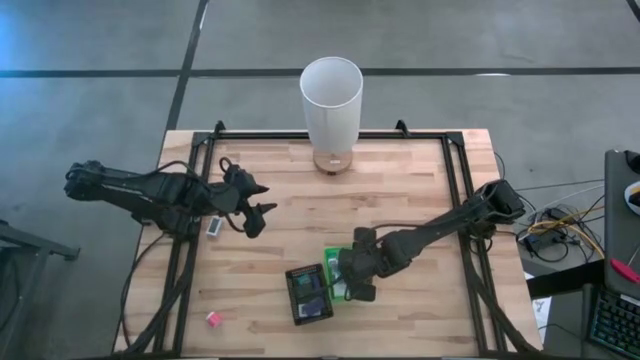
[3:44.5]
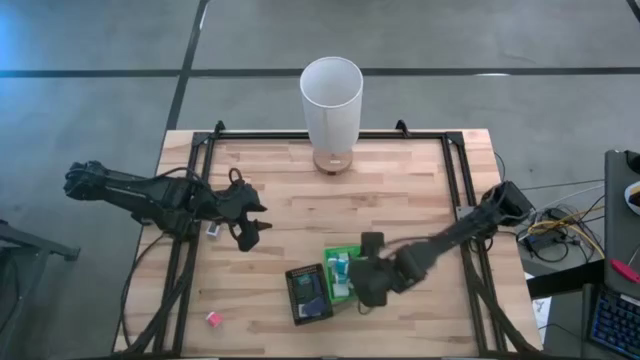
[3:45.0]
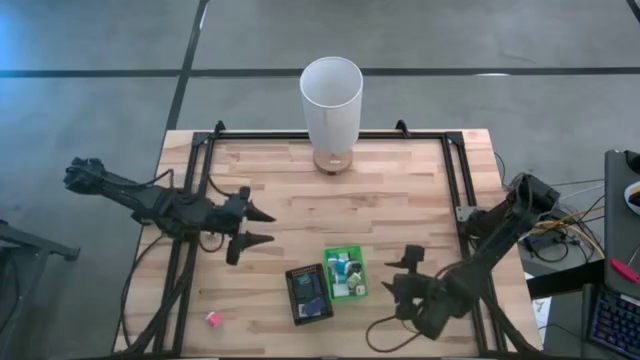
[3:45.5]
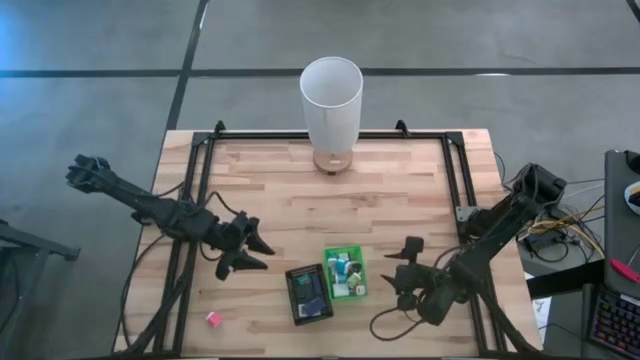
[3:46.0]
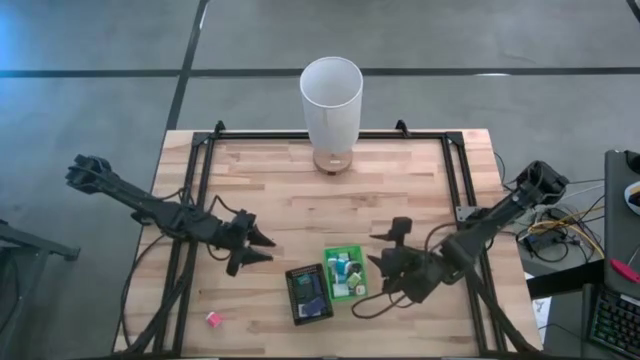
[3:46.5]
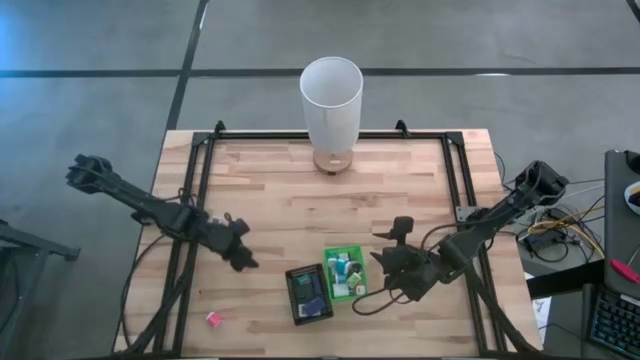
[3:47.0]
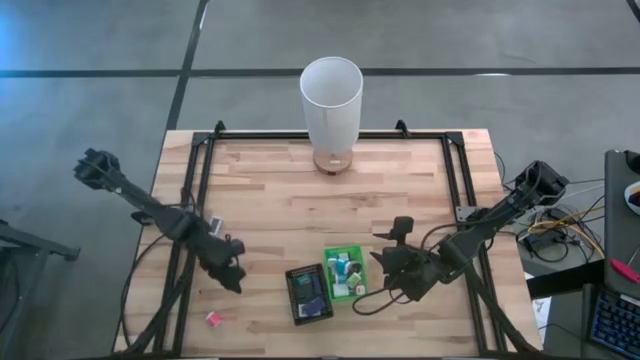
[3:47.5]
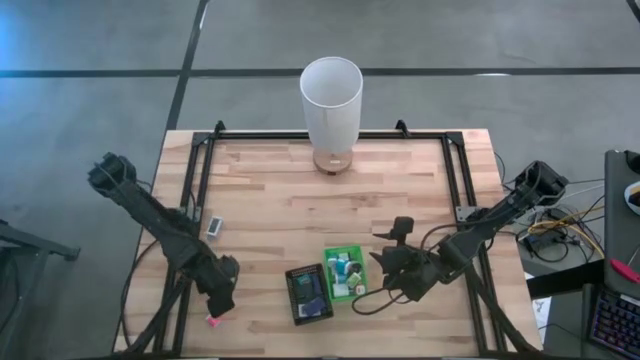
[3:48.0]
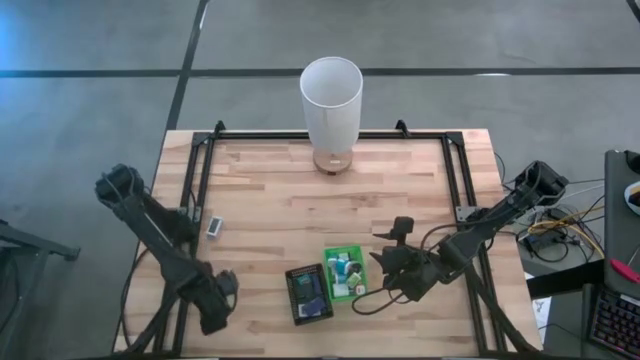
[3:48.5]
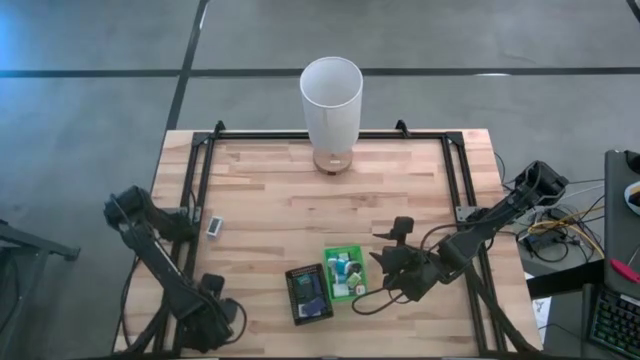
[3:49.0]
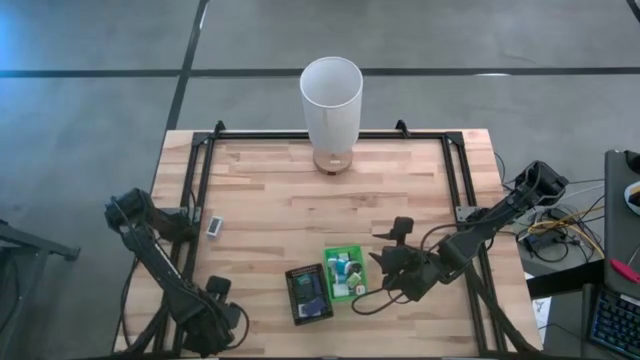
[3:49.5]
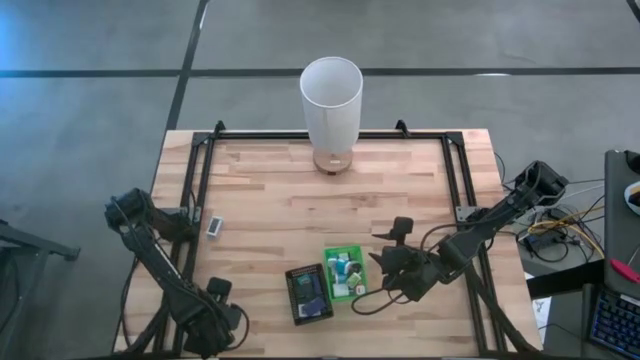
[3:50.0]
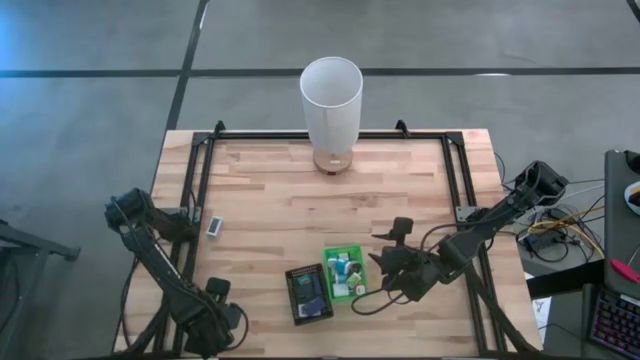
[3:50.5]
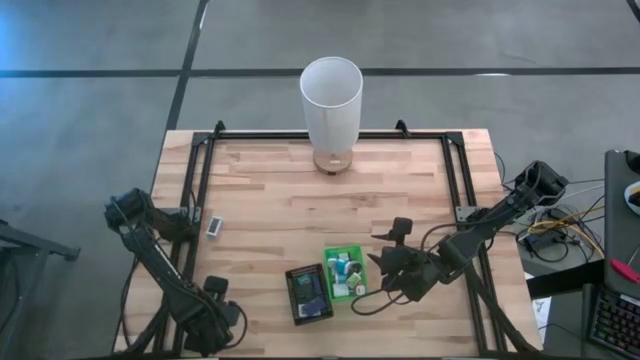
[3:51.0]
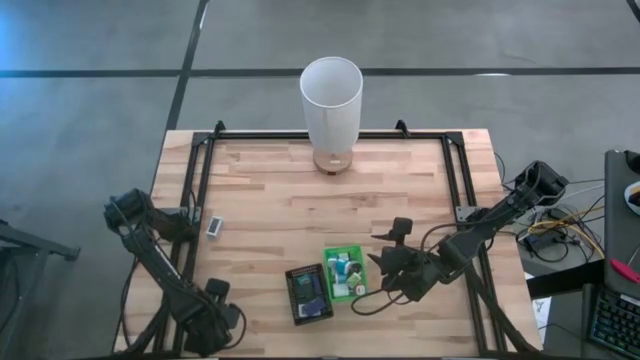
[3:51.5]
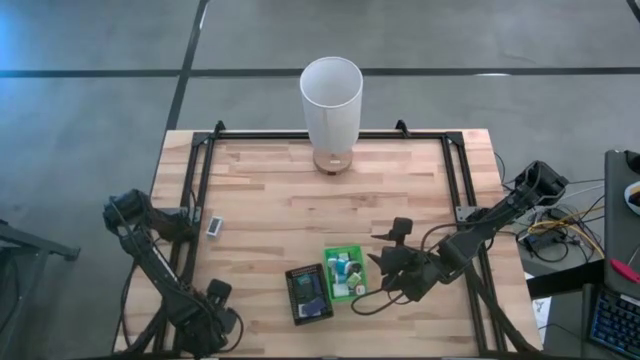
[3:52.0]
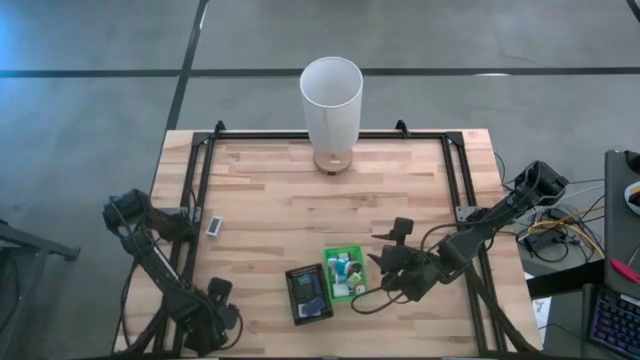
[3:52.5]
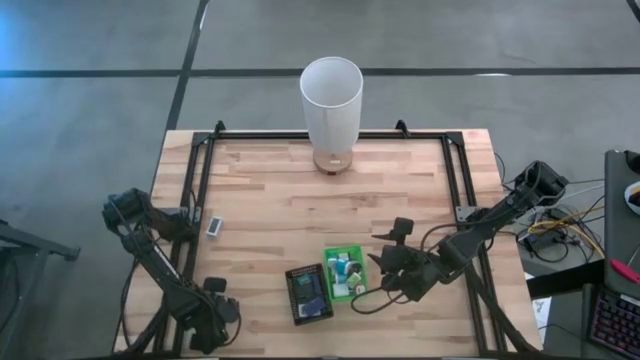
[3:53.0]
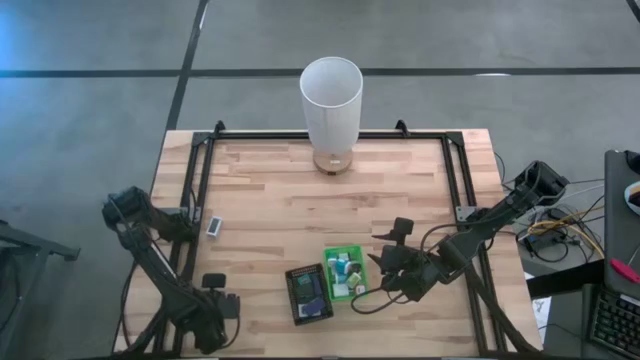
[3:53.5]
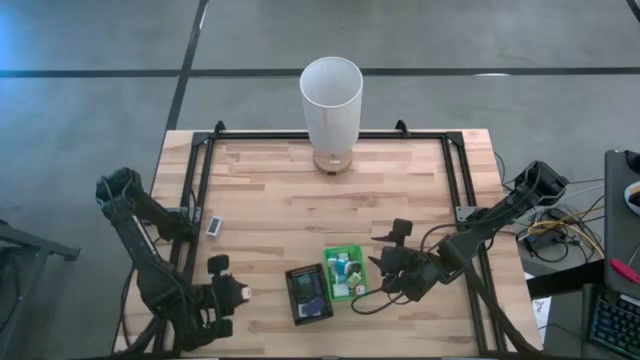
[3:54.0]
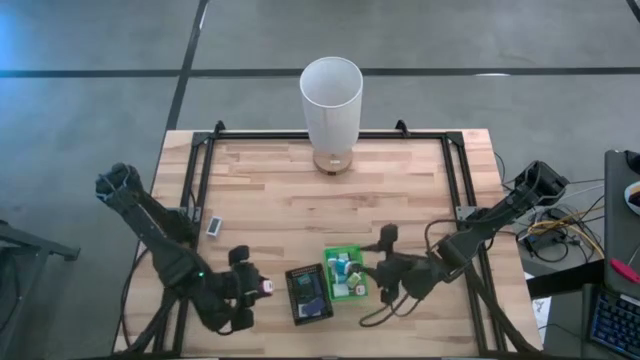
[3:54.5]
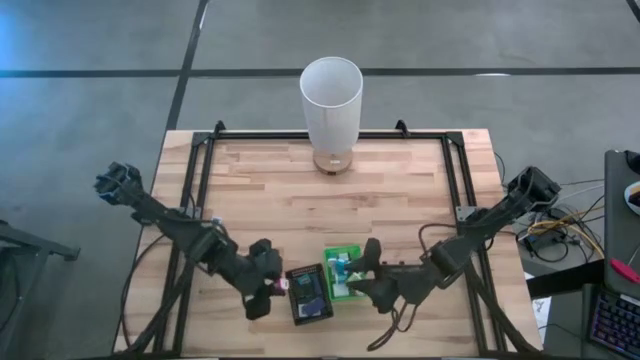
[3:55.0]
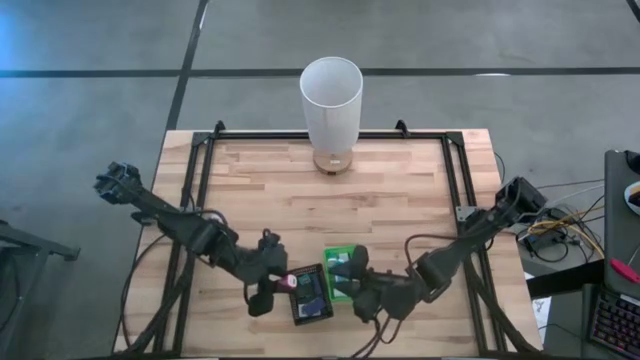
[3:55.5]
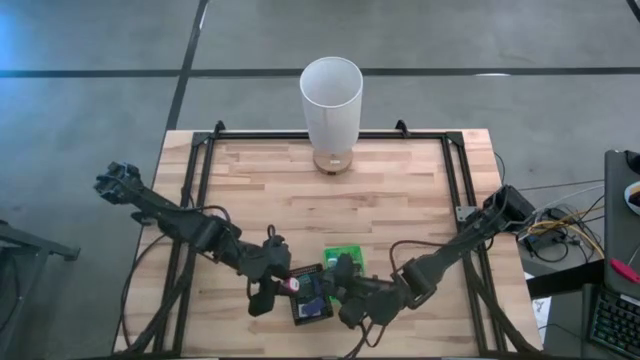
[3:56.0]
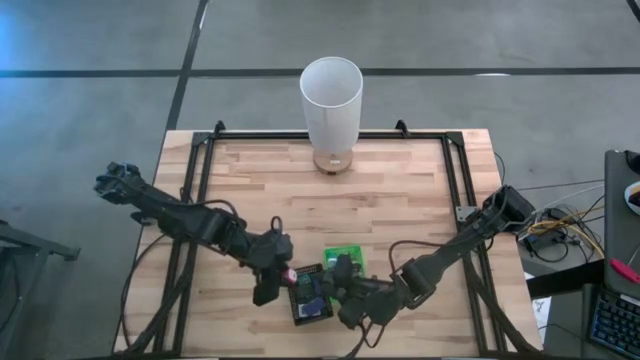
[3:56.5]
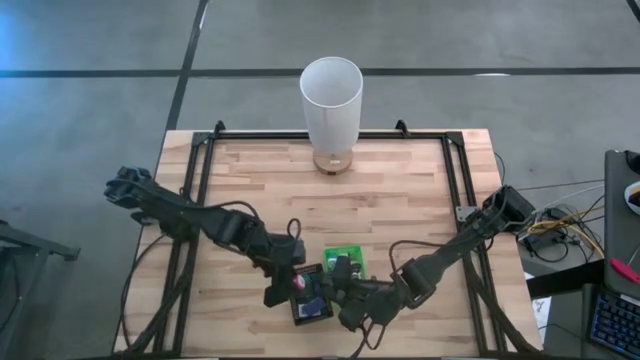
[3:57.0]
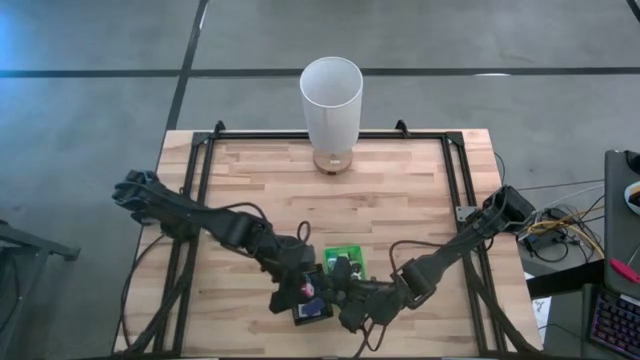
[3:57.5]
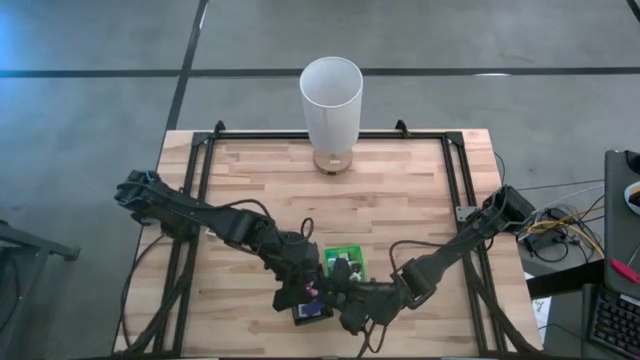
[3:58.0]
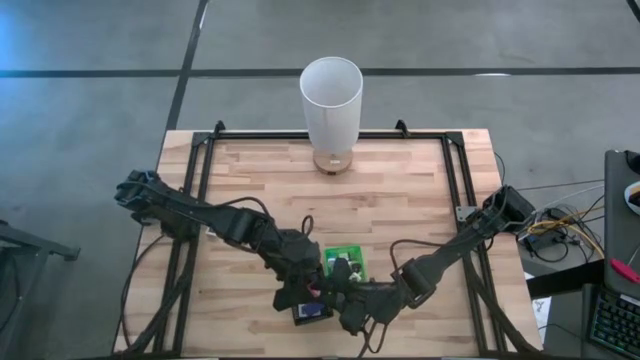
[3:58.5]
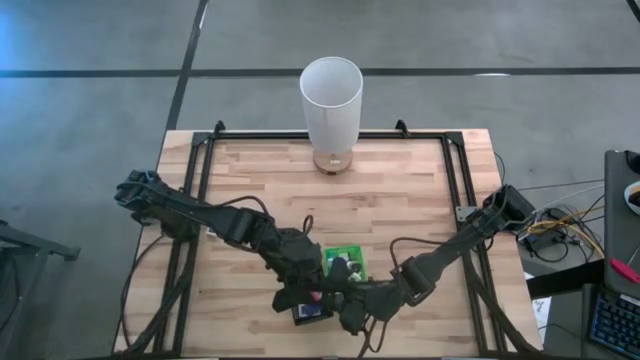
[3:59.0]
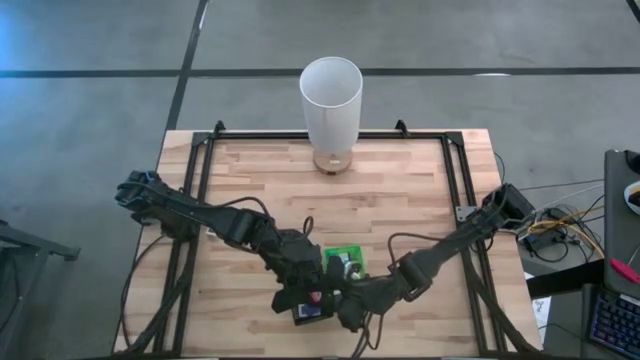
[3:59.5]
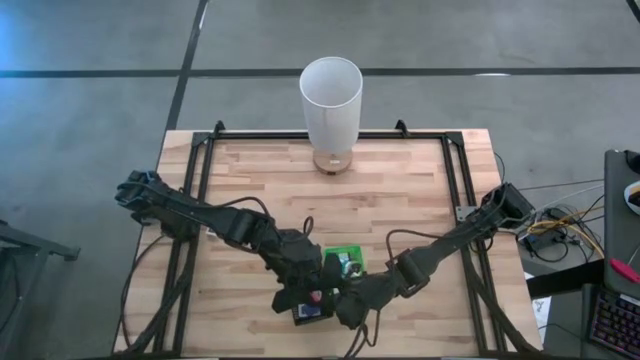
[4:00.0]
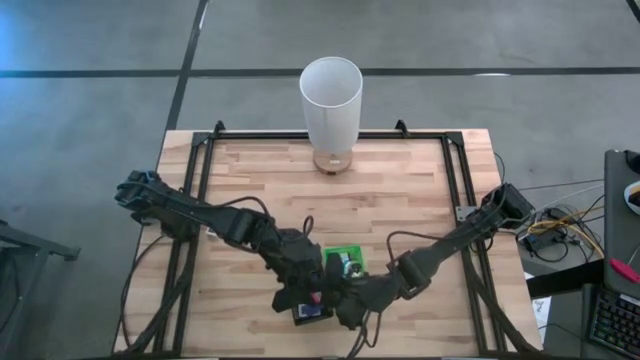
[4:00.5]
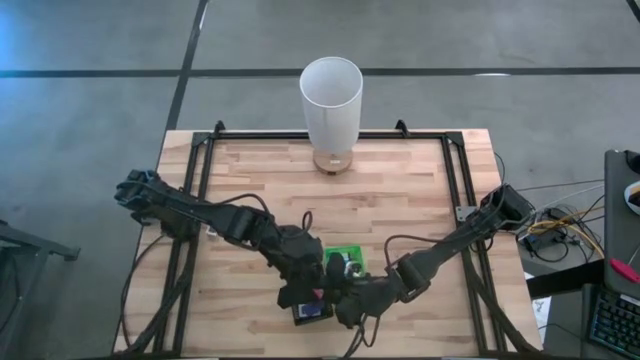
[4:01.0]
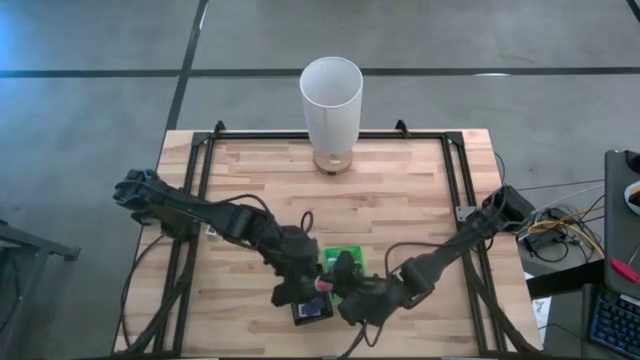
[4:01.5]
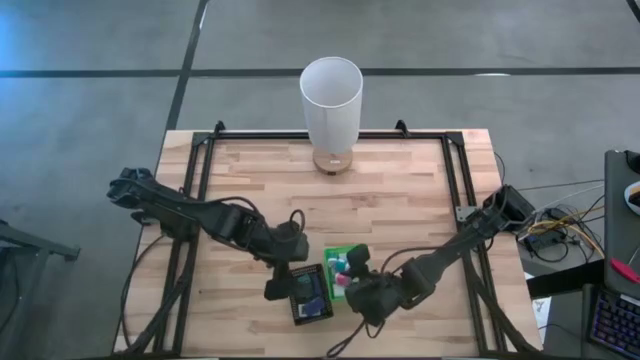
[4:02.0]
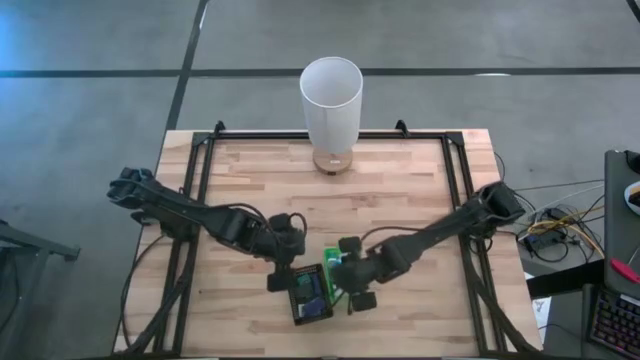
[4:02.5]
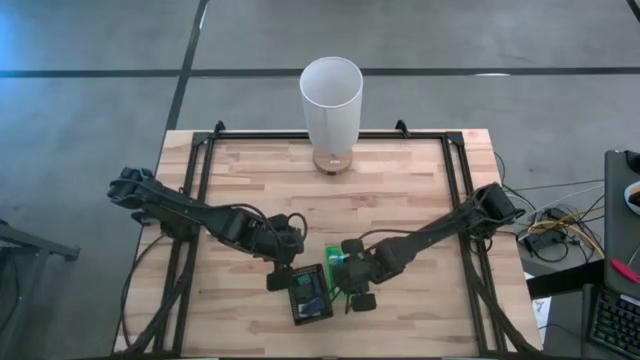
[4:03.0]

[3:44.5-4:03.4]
Task: Pick & Place Office items
Put the pink charger adapter into the green bin
